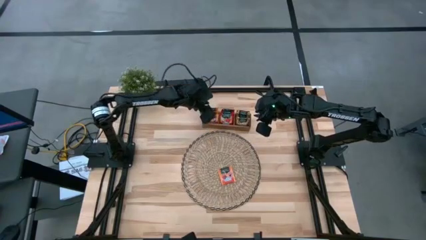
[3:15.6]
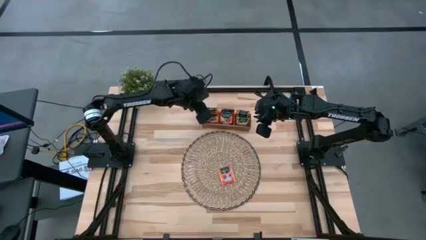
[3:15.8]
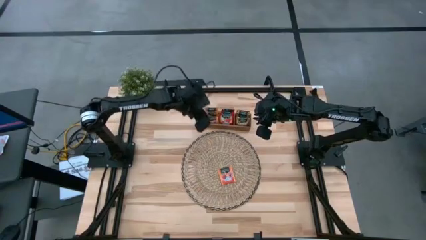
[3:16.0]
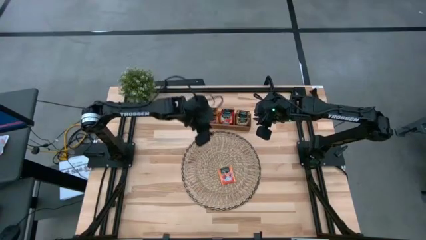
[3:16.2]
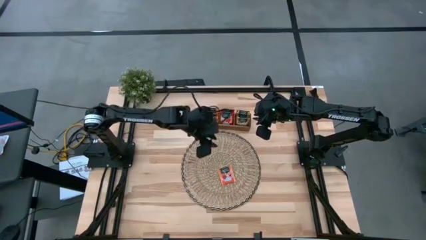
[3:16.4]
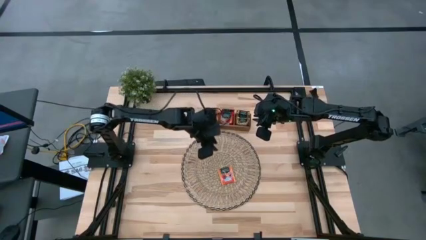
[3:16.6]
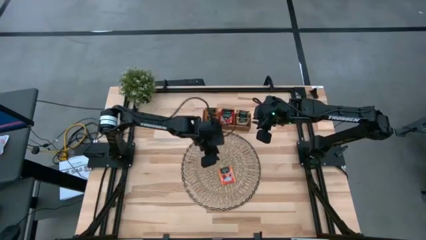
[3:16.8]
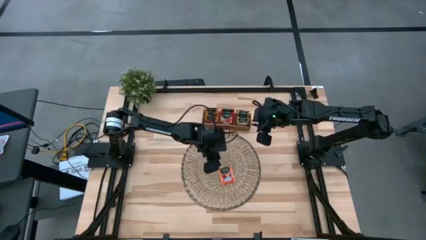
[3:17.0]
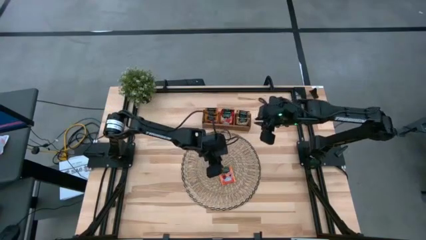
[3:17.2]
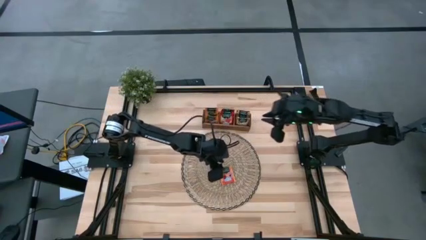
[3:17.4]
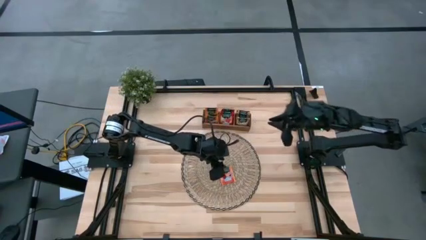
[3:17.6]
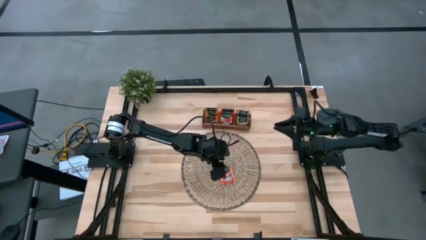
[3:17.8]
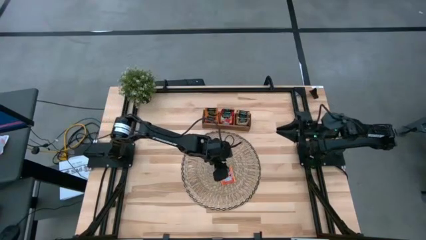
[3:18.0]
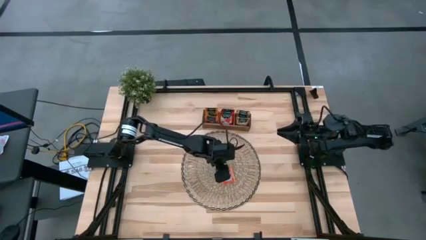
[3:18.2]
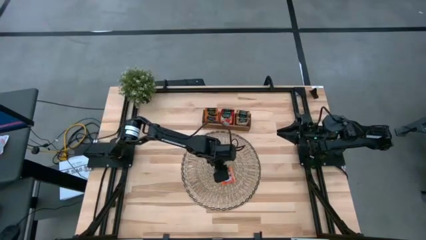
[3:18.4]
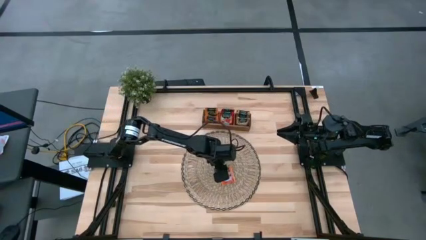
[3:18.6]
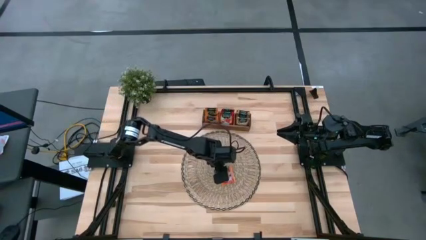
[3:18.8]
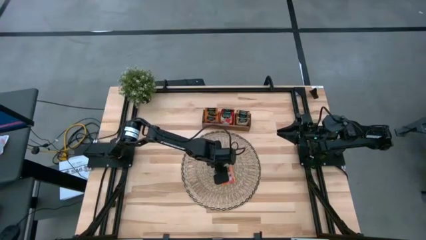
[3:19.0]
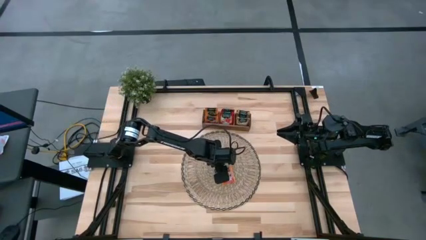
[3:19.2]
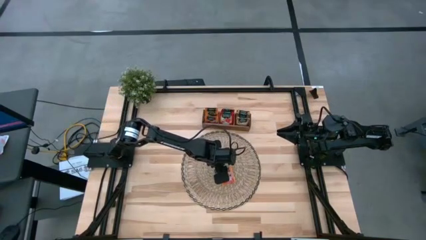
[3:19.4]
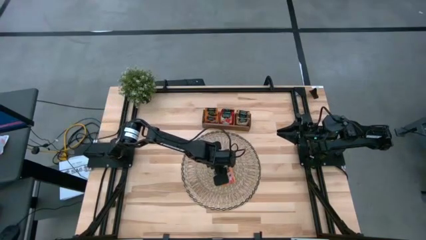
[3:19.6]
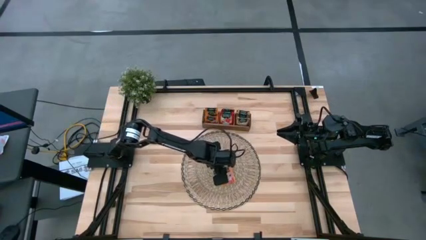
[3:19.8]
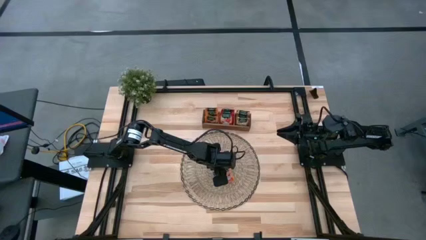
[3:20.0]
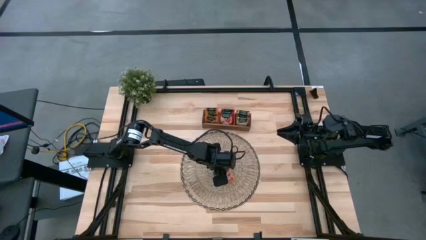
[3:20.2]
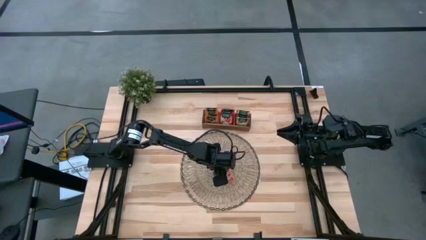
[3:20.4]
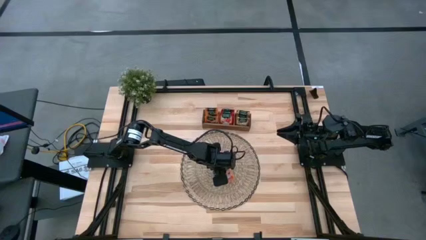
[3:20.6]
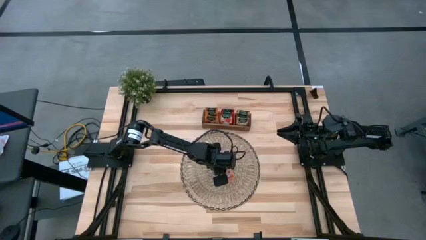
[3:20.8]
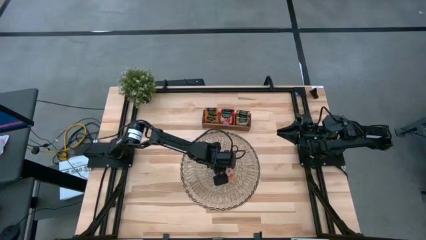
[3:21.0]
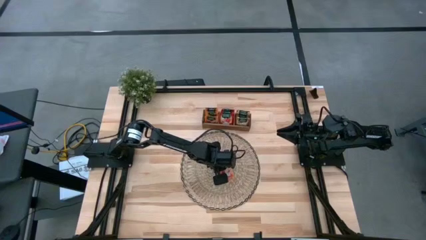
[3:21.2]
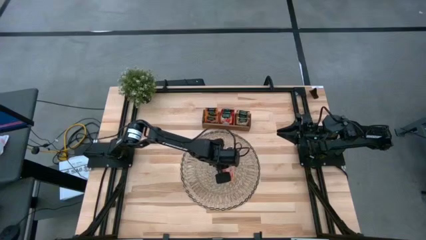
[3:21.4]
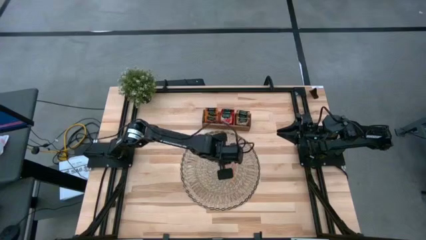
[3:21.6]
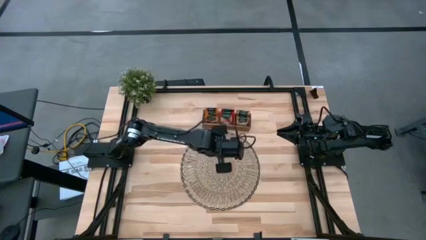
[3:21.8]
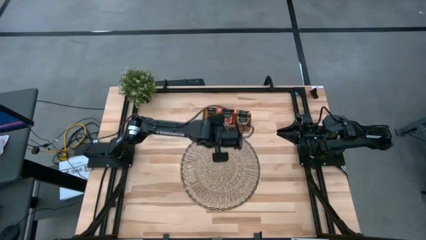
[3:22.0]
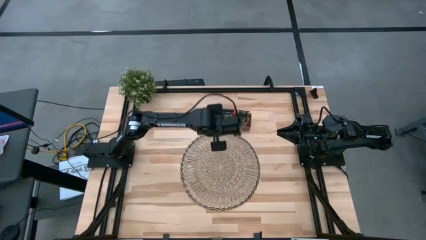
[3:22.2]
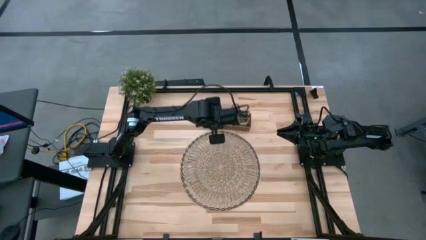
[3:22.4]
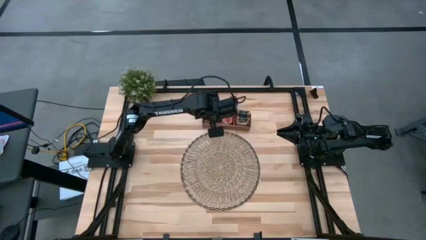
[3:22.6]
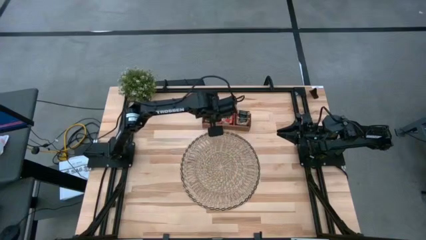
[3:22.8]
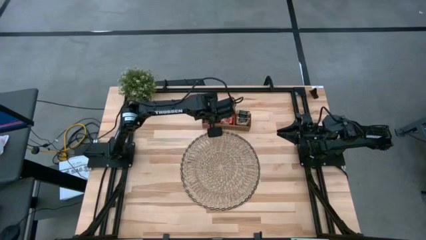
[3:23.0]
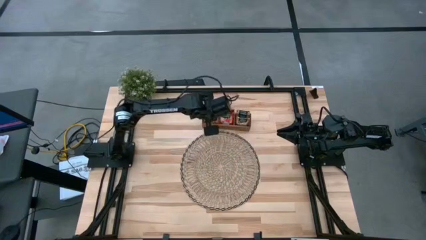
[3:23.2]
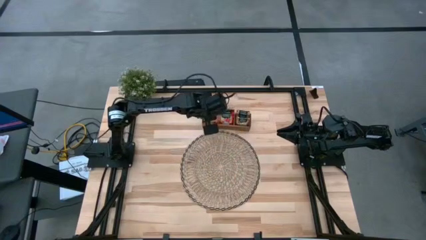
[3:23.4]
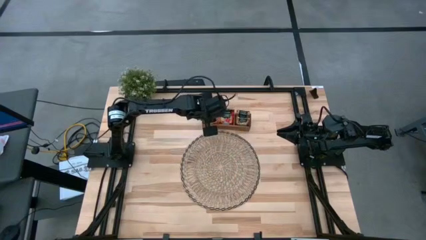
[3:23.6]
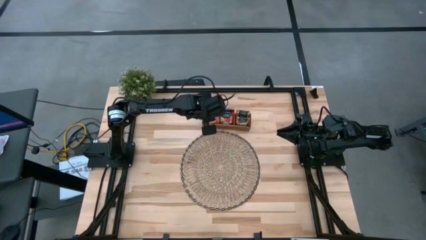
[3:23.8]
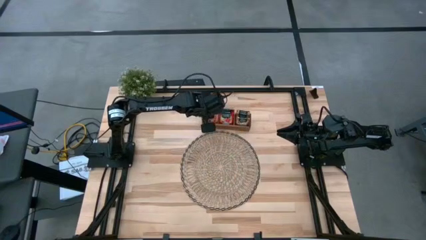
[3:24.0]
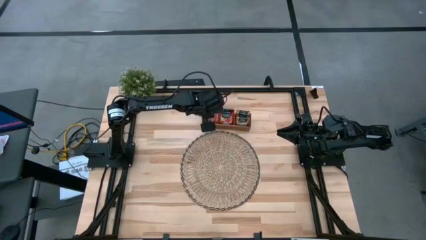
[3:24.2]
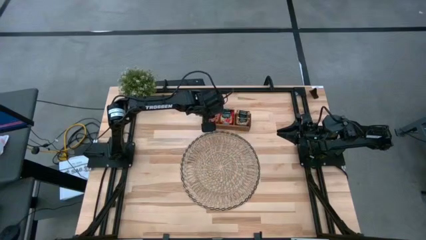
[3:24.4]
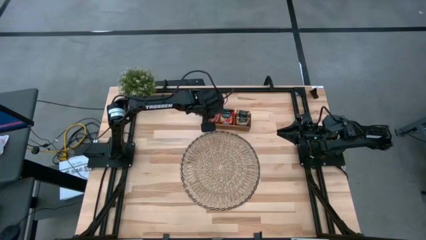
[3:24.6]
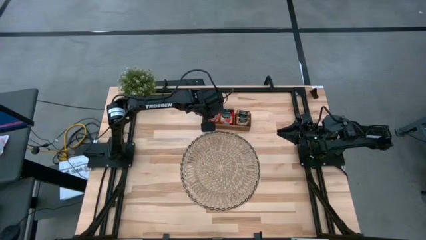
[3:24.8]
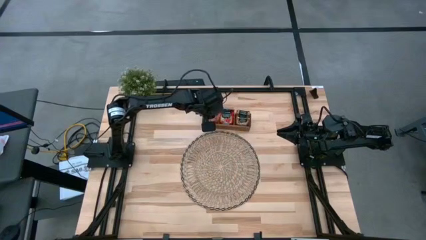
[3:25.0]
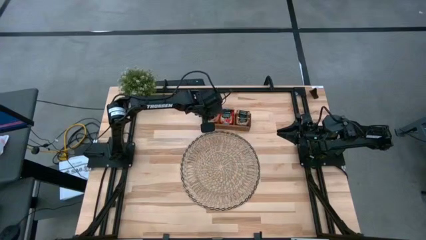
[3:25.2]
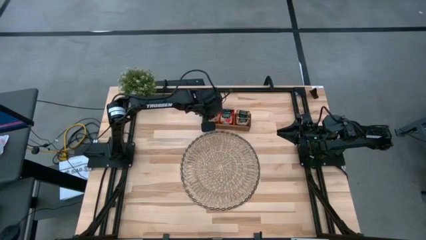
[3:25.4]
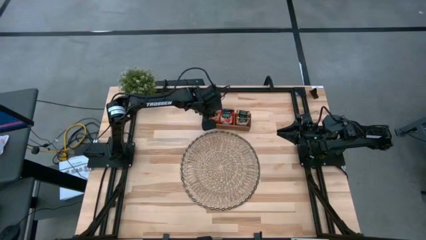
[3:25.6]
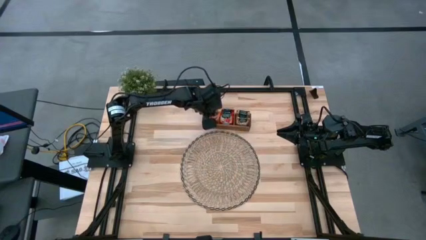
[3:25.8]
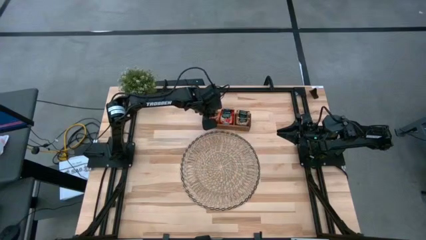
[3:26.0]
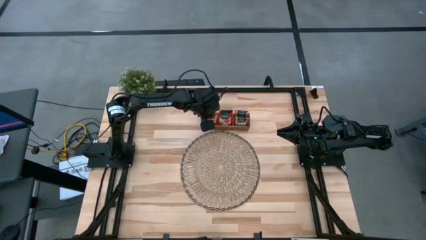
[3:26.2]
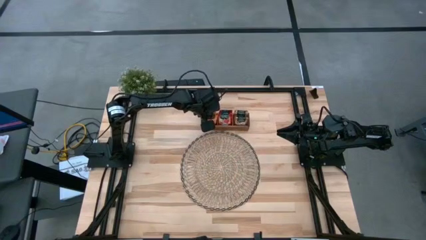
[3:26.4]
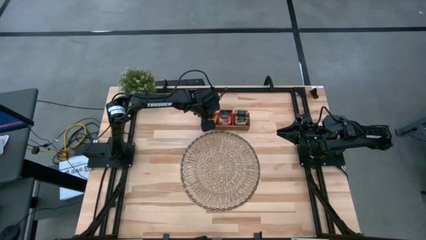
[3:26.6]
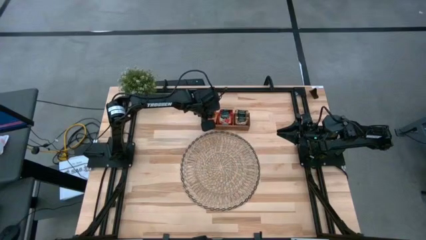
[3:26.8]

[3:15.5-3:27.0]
Task: Pick & Place Tea
Put the orange tea bag into the left section of the wooden organizer
